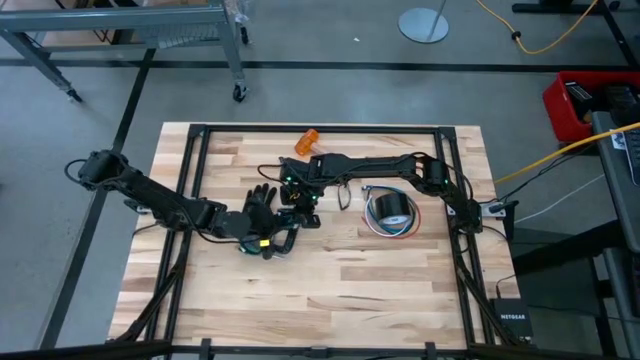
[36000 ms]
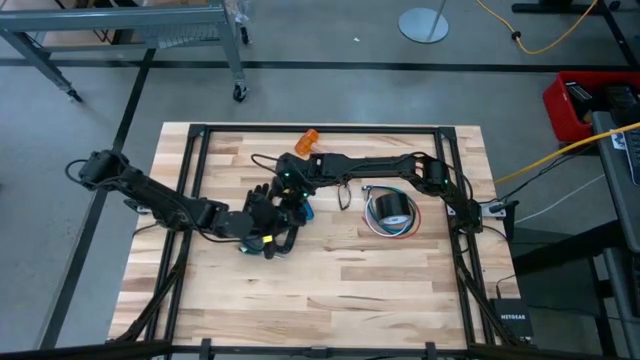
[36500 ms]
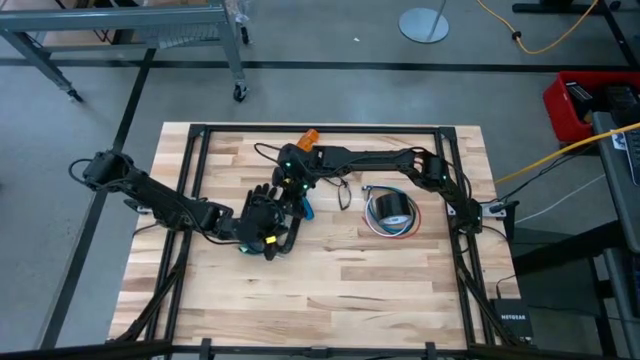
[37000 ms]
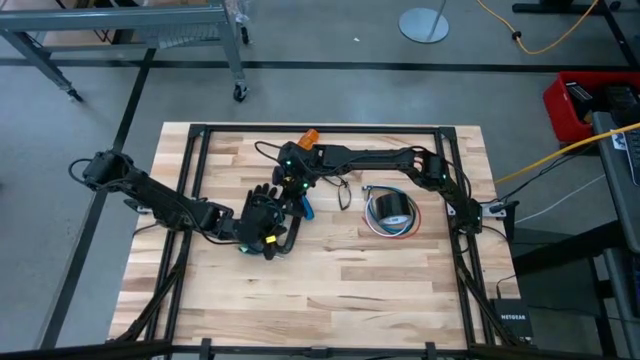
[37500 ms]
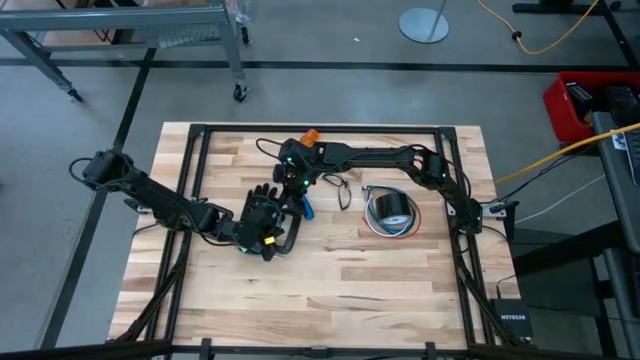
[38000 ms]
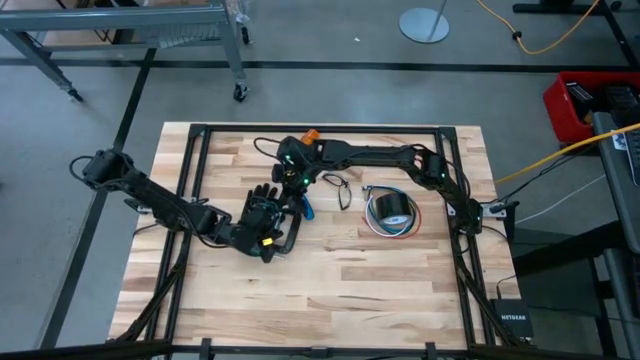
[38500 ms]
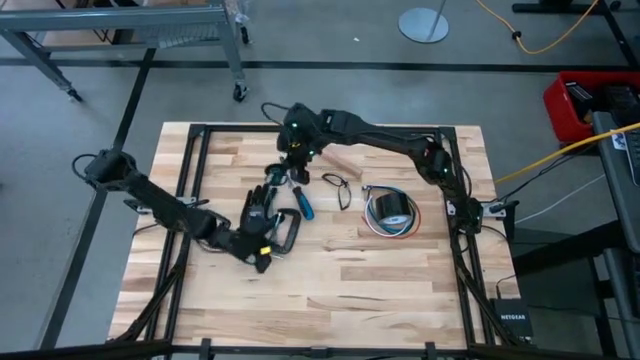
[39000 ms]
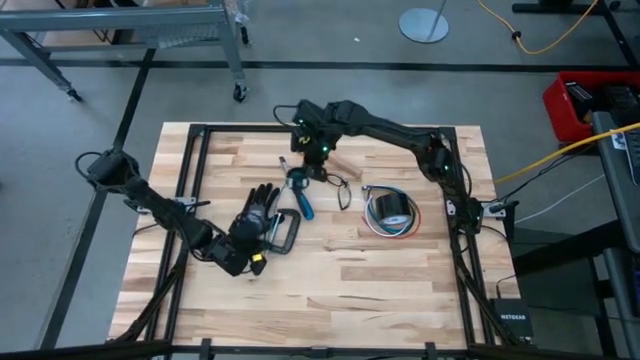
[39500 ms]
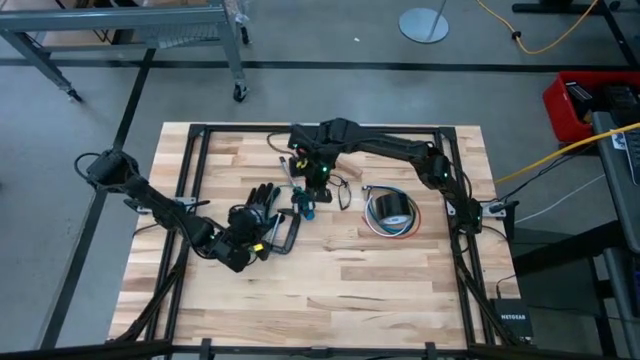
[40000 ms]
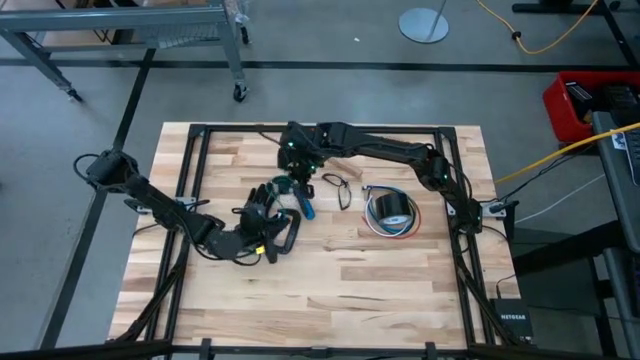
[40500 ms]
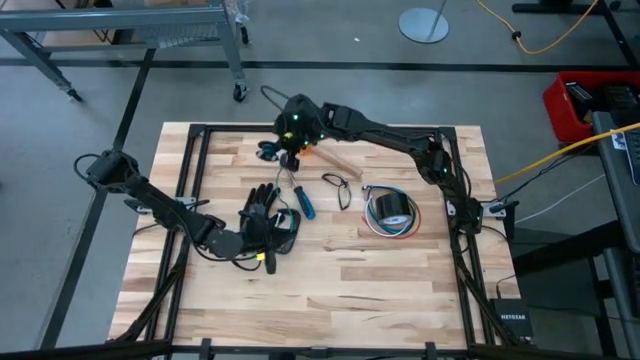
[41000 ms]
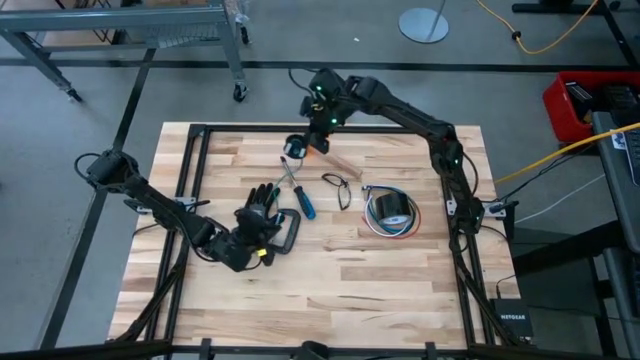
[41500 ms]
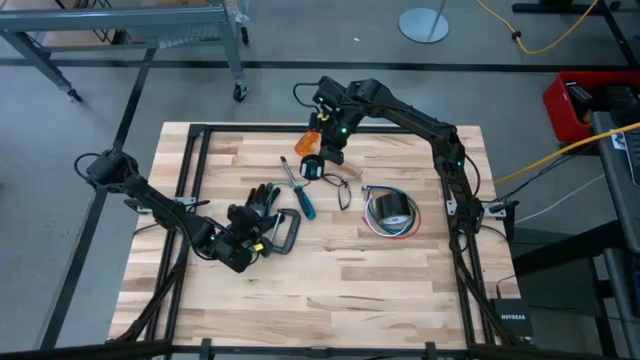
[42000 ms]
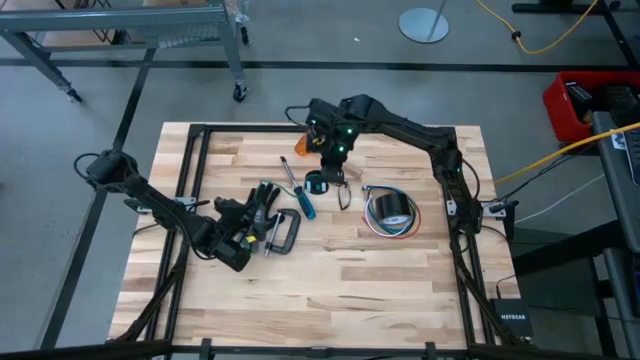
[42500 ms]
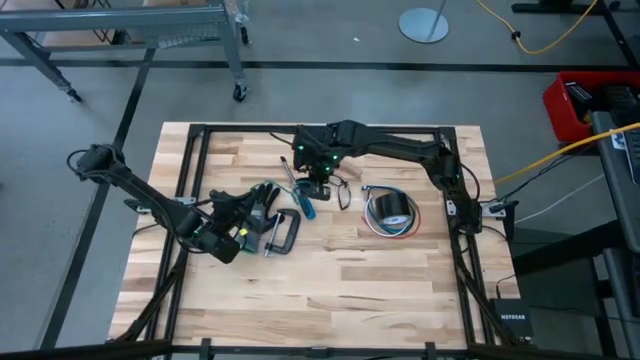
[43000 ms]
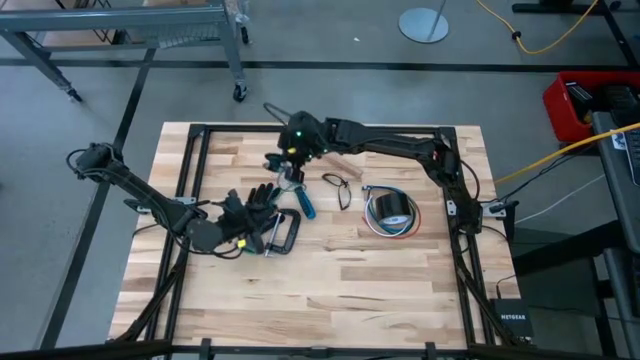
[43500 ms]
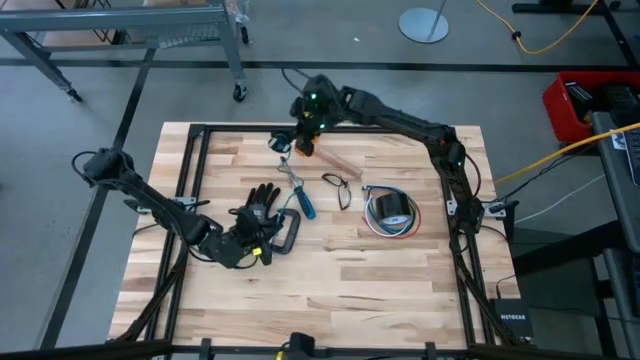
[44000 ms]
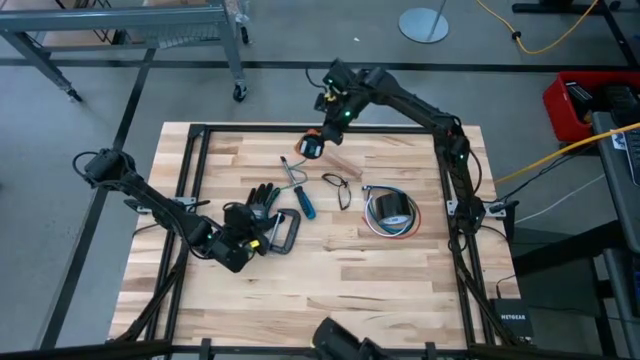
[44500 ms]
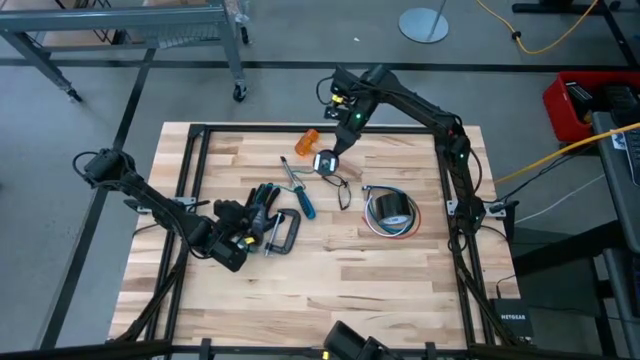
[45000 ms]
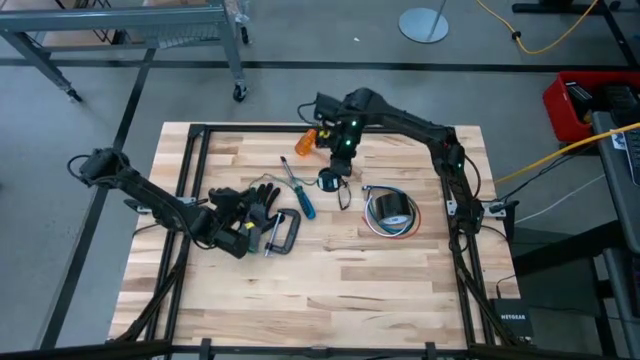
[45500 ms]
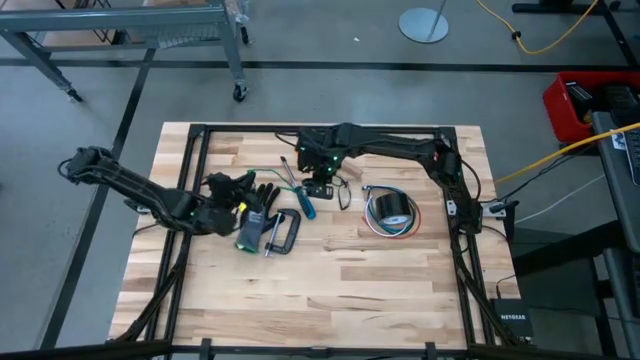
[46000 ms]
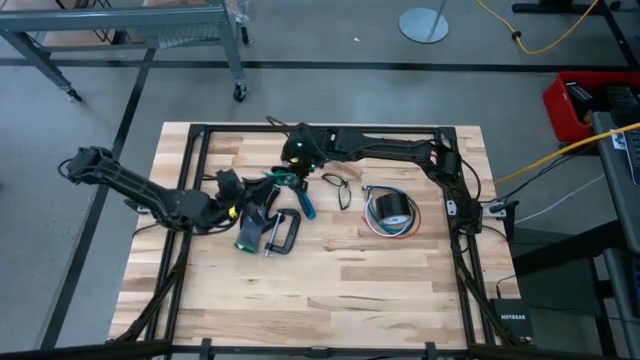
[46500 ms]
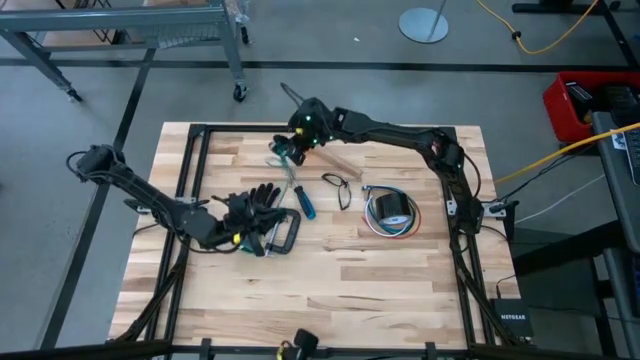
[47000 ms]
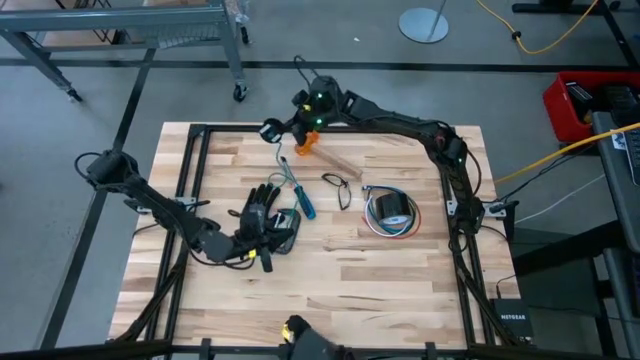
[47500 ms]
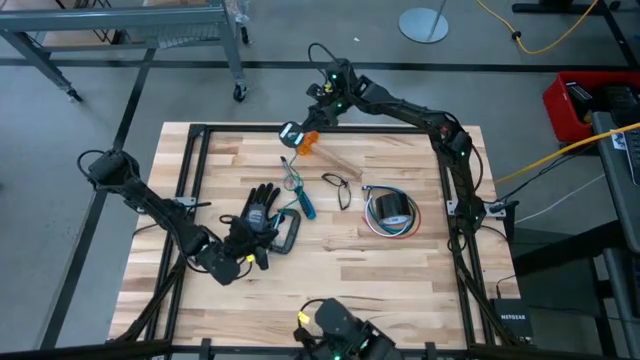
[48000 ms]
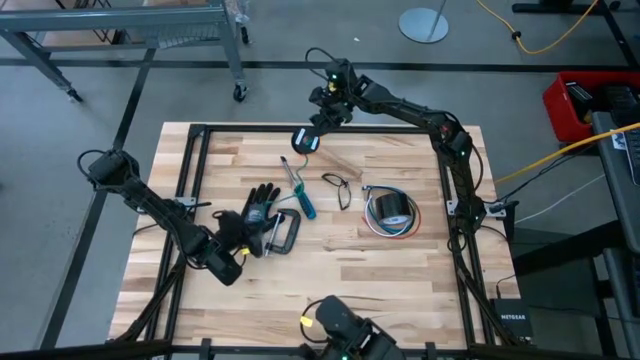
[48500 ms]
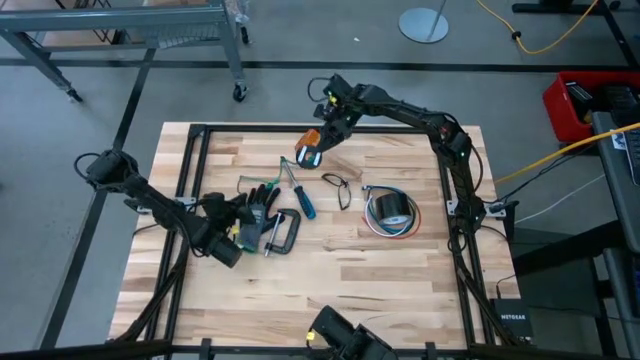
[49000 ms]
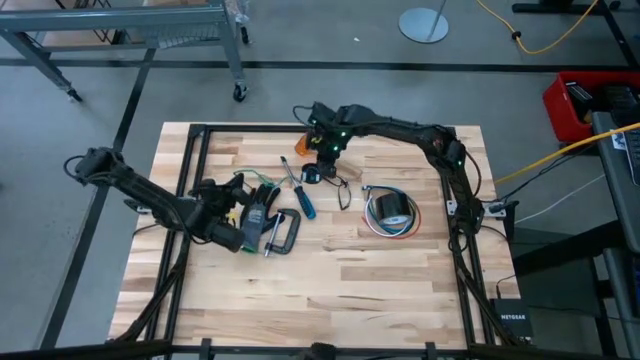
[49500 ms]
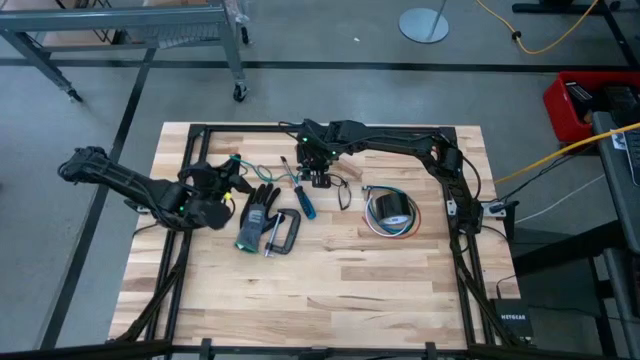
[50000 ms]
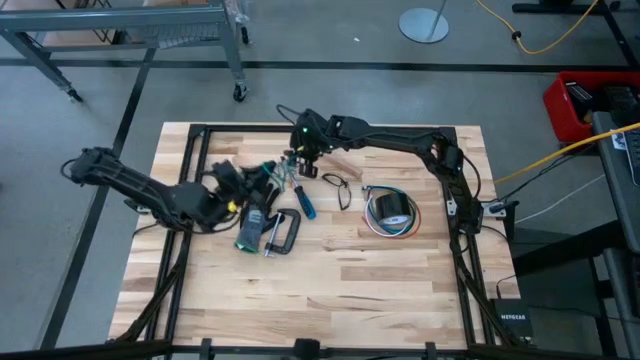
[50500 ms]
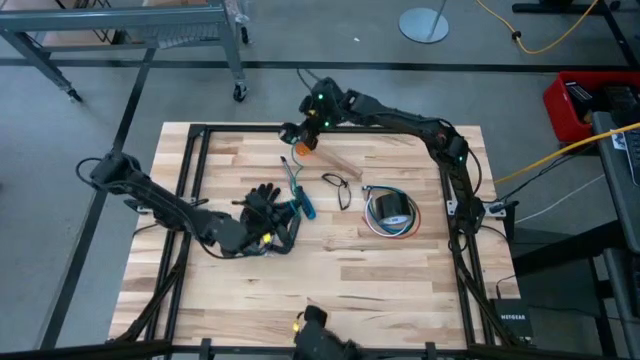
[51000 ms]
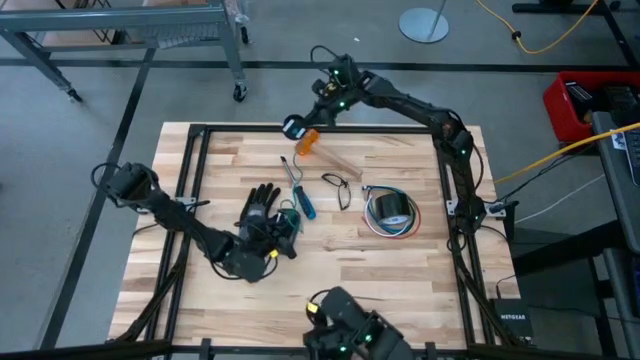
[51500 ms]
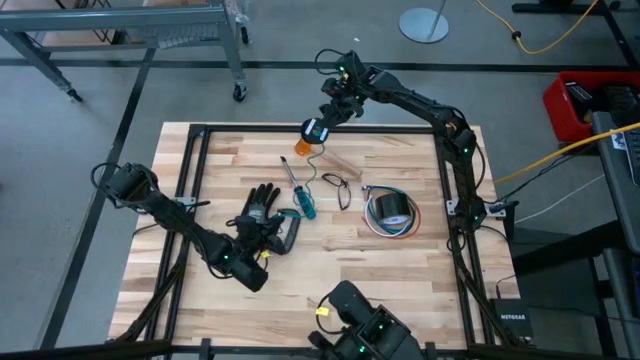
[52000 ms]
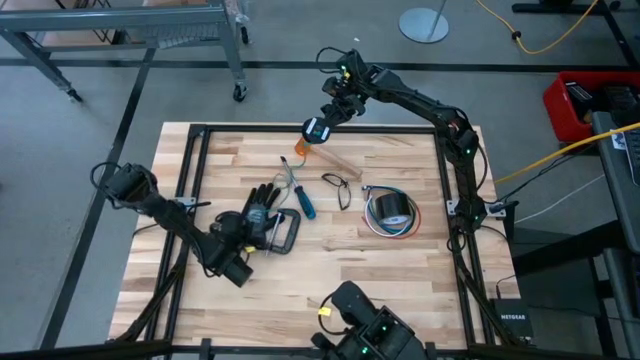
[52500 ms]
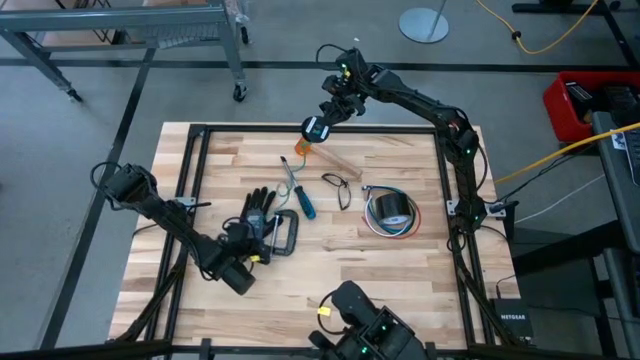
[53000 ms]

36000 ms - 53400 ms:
Task: Coil cords
Uncoil the green wire from the spool

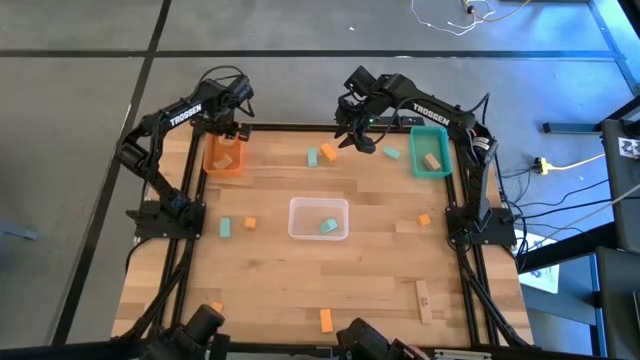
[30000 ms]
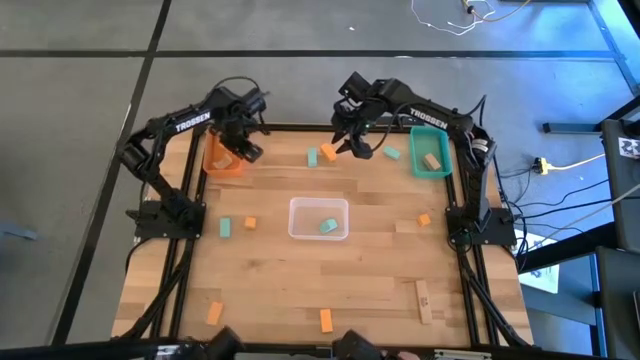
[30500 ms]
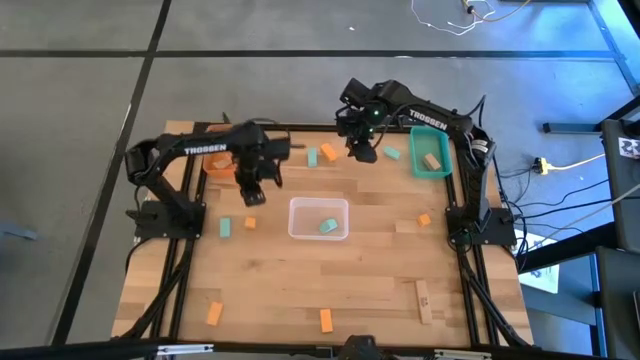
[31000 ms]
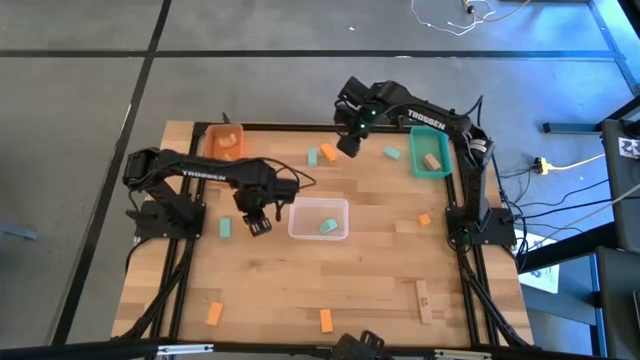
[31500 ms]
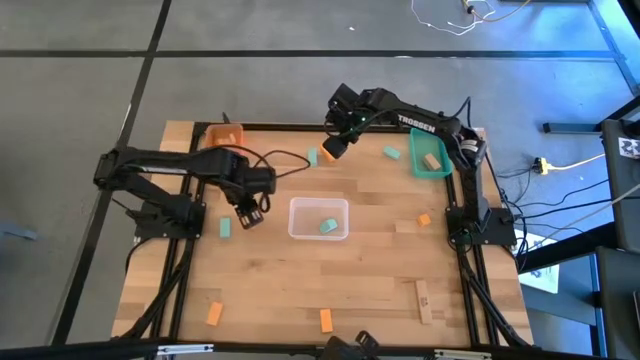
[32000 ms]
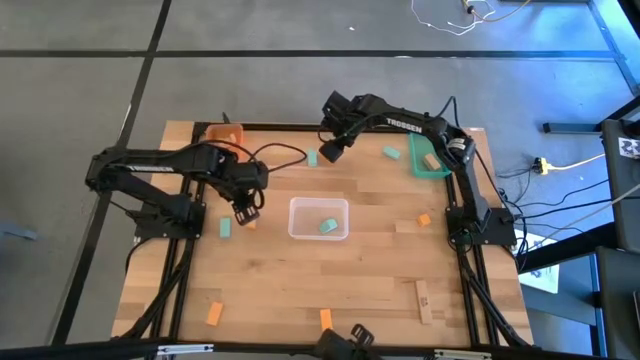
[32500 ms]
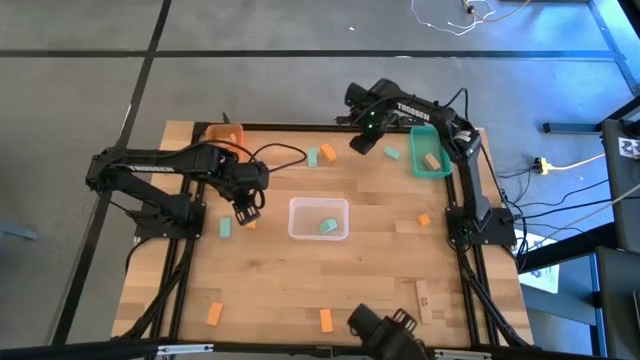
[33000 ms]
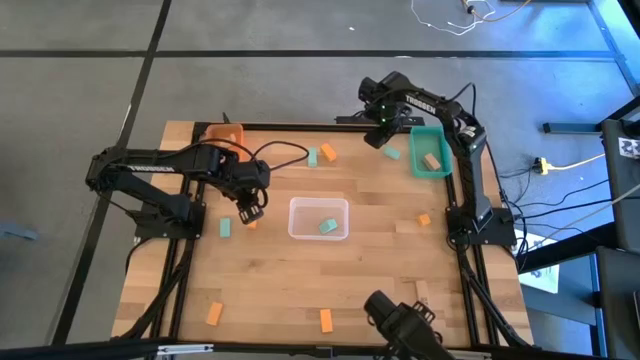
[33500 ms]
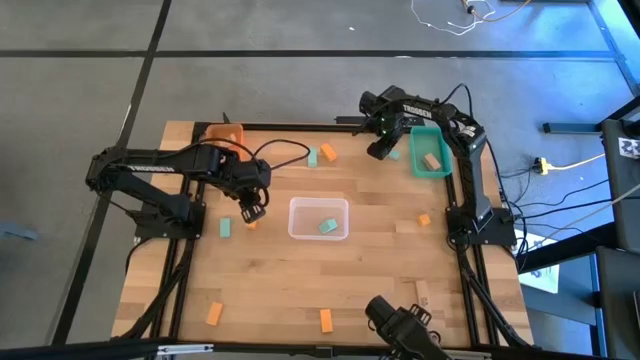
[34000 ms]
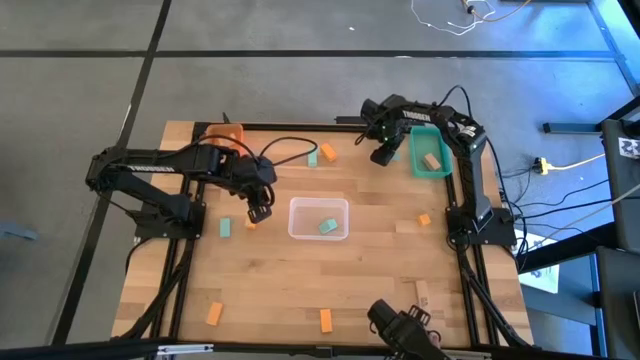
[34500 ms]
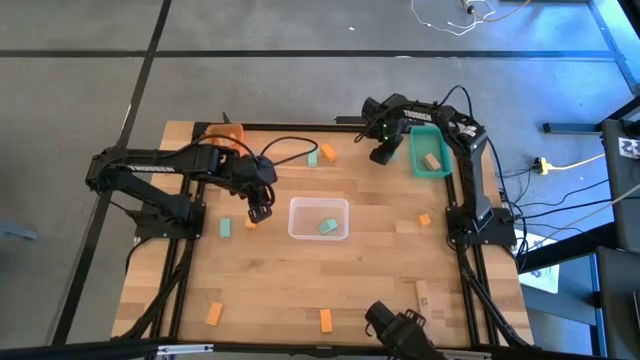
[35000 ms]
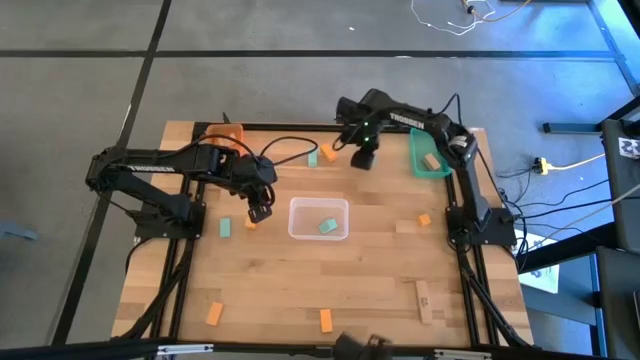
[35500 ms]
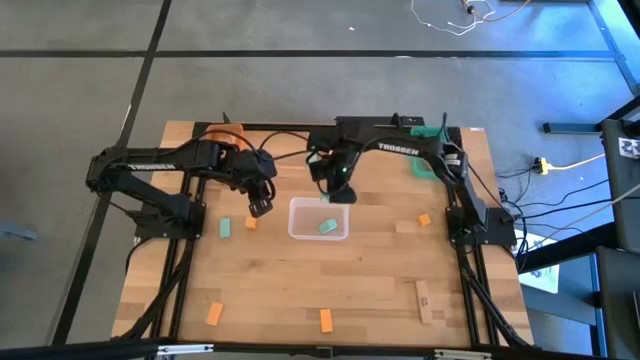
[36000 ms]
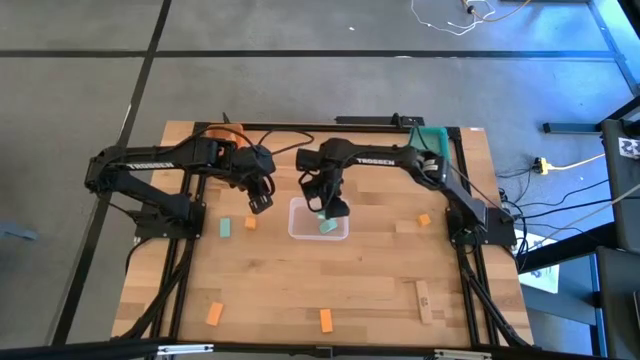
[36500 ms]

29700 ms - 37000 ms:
Task: Sort & place blocks by color
Put the blue block into the transparent bin
